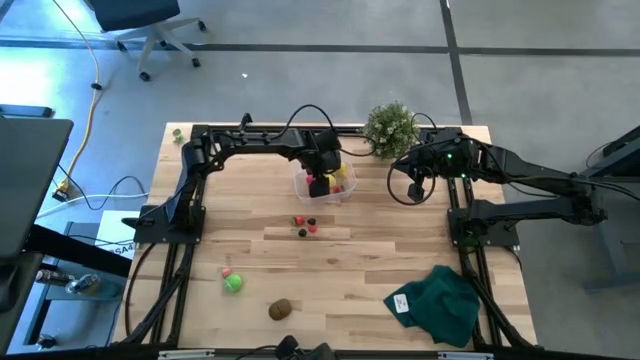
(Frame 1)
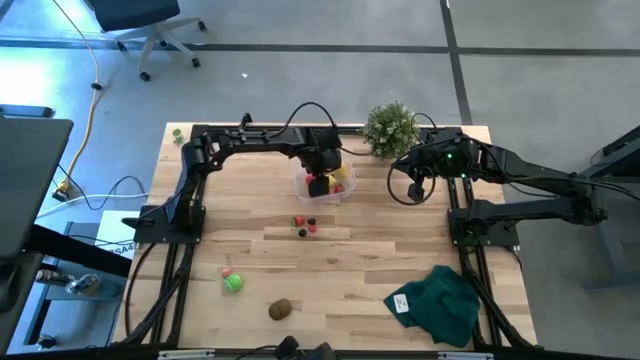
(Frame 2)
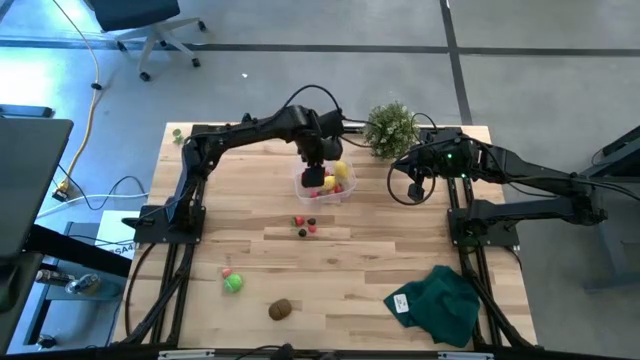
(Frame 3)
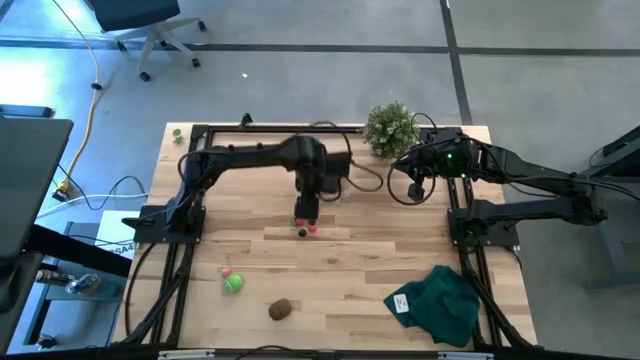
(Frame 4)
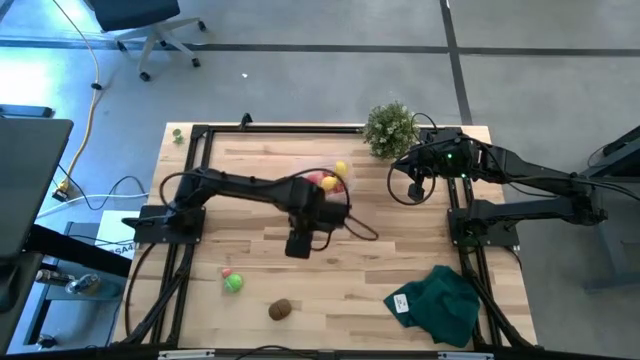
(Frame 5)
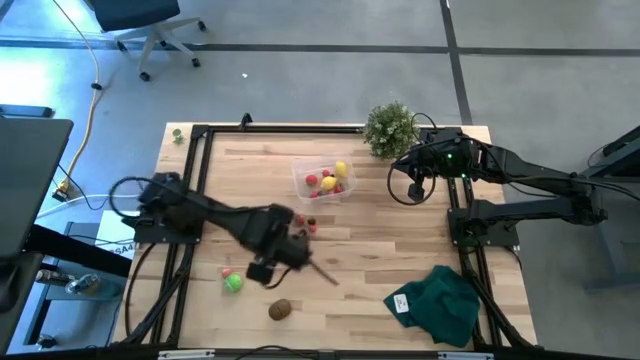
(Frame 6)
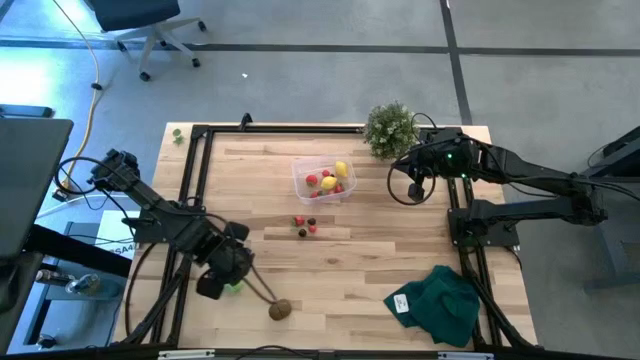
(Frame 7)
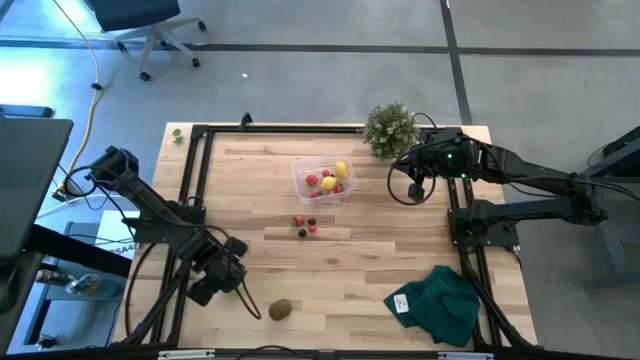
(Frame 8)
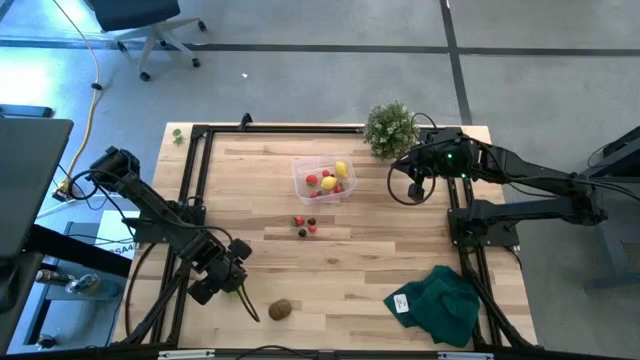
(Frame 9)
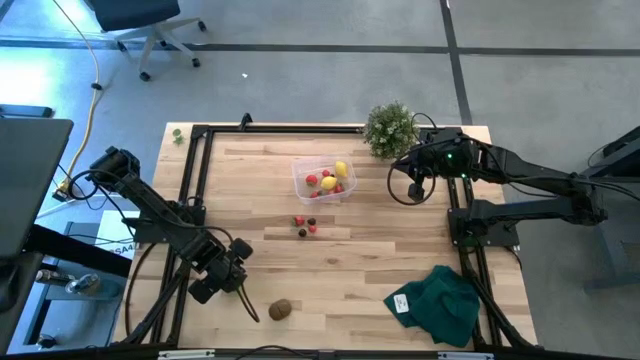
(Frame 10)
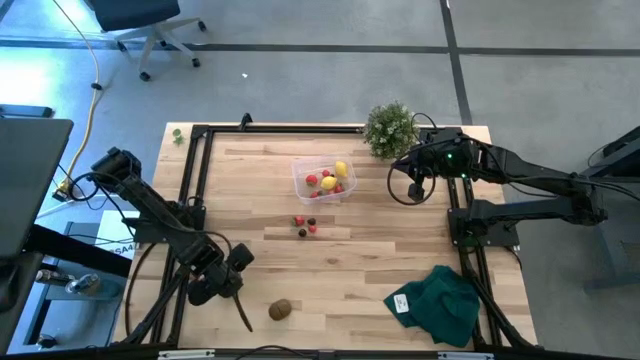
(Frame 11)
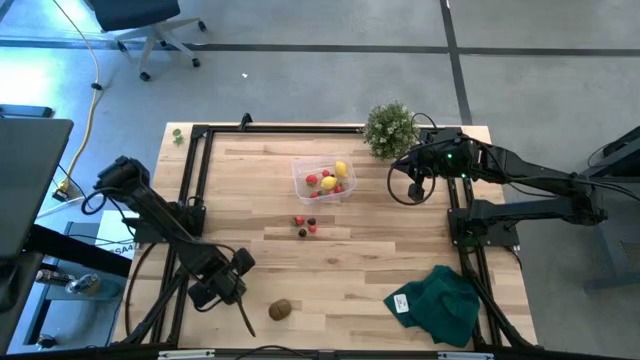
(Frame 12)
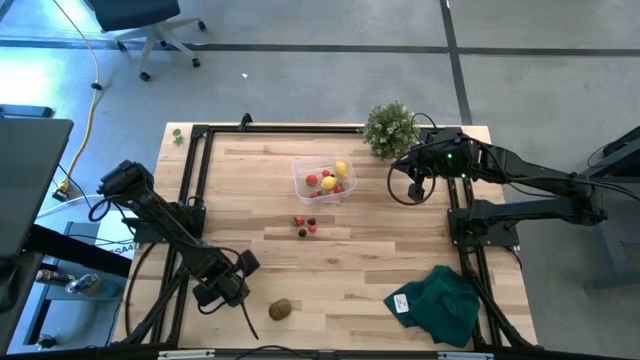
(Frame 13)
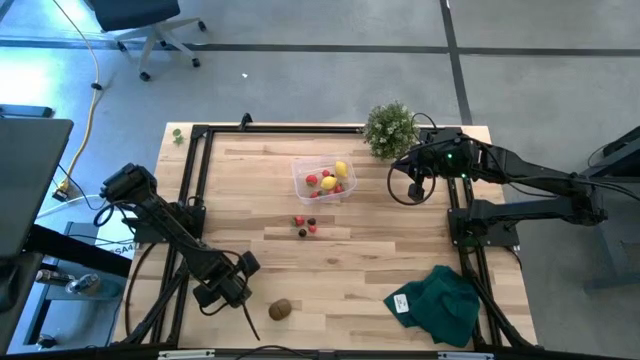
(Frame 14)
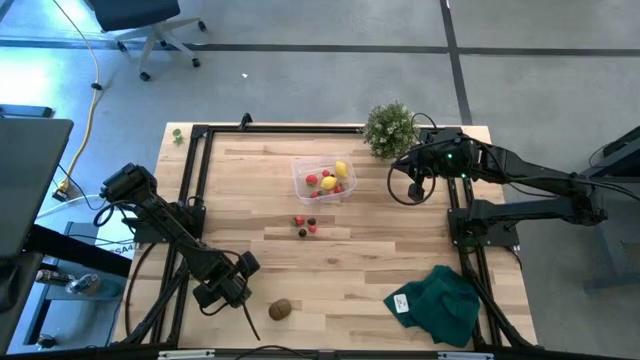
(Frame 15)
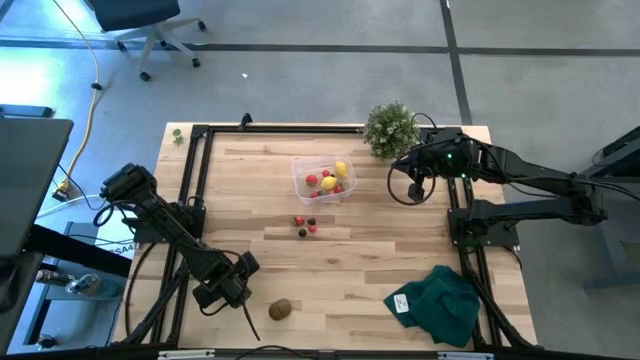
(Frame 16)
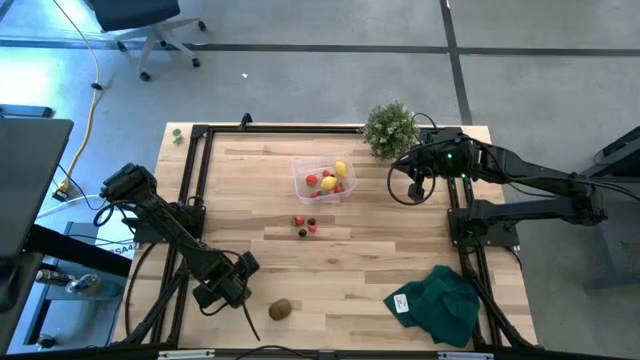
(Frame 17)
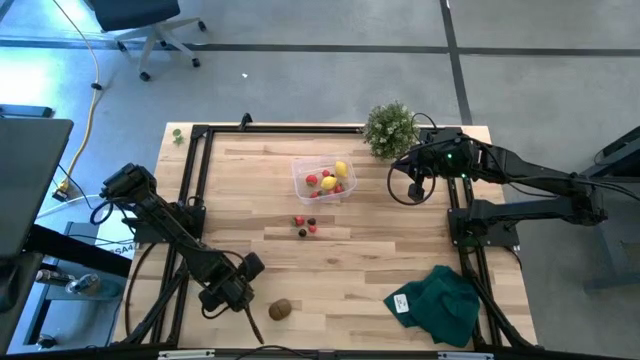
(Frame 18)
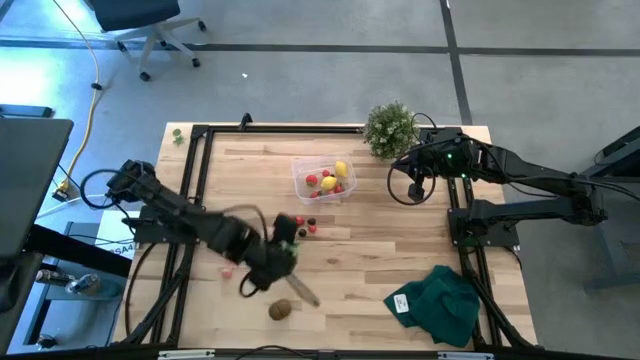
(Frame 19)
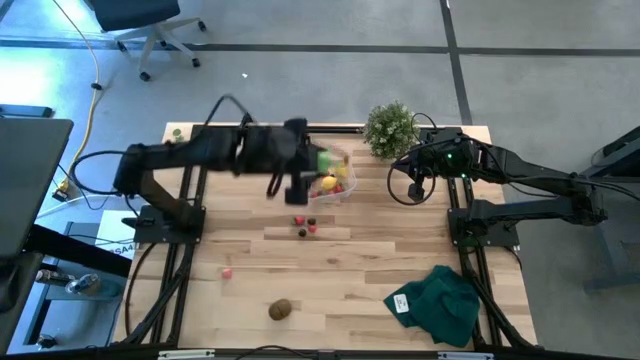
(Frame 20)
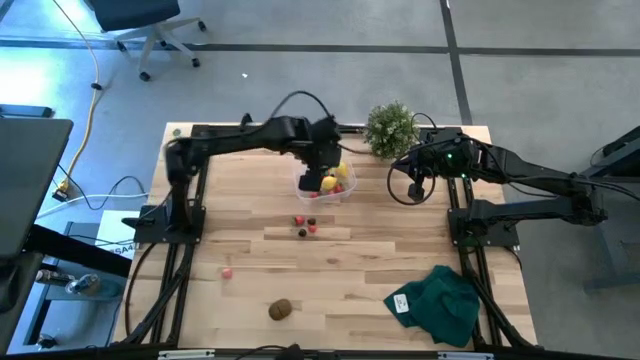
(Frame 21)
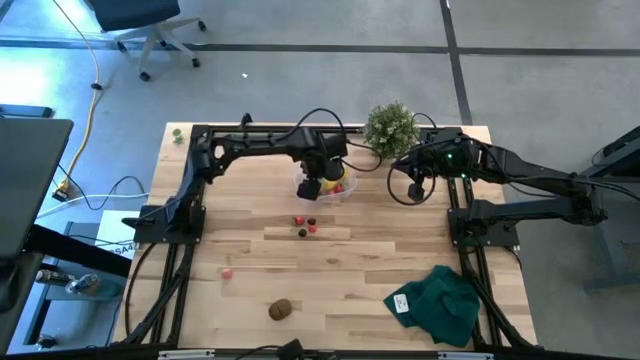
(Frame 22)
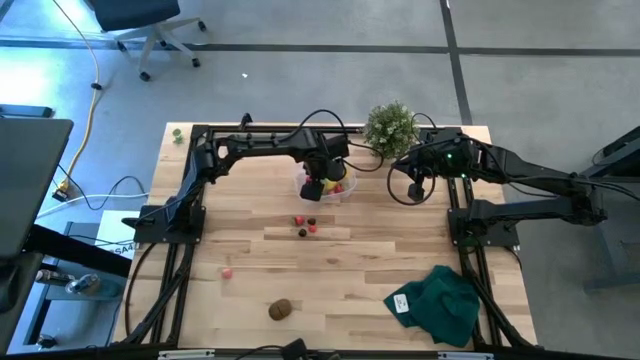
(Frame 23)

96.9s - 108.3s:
Task: Pick and placing Produce into tupperware
Put the green cabbage into the transparent bin

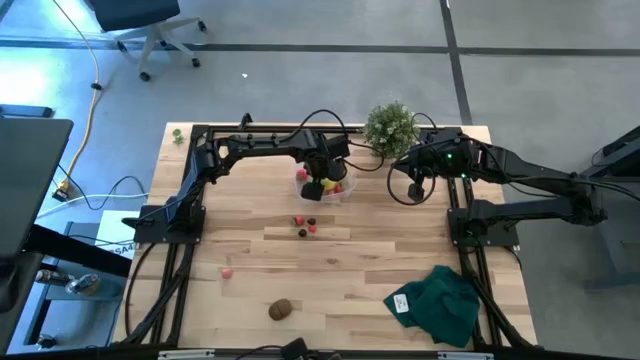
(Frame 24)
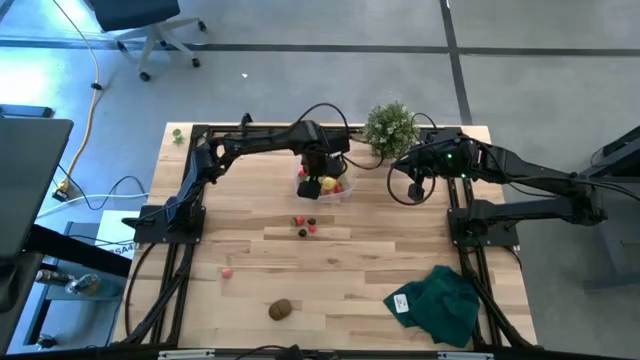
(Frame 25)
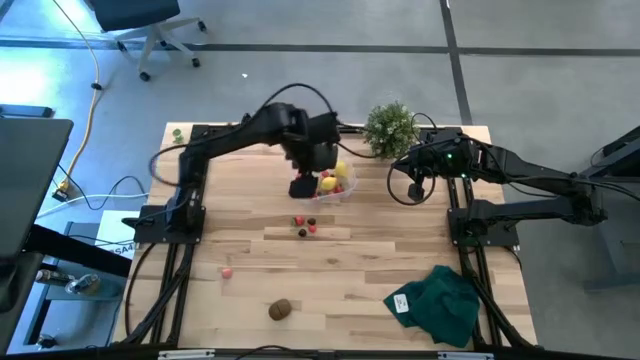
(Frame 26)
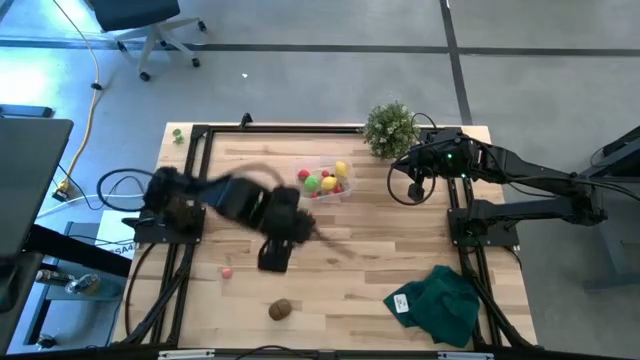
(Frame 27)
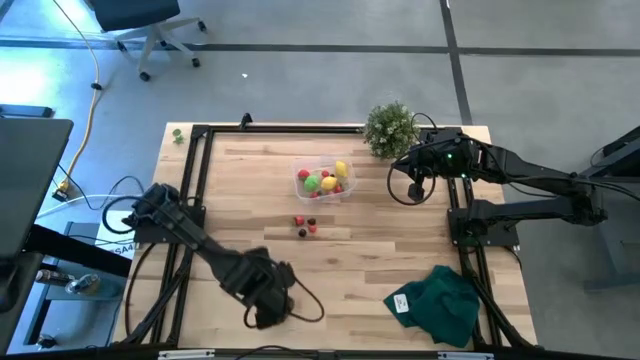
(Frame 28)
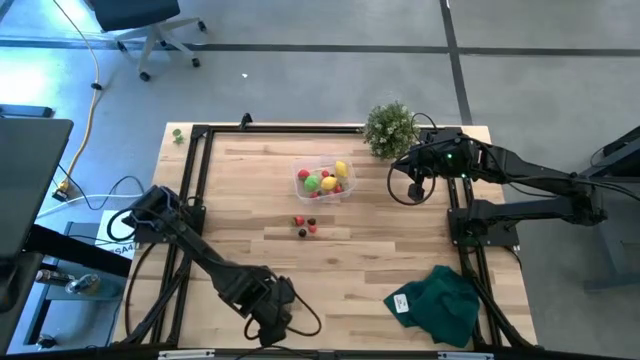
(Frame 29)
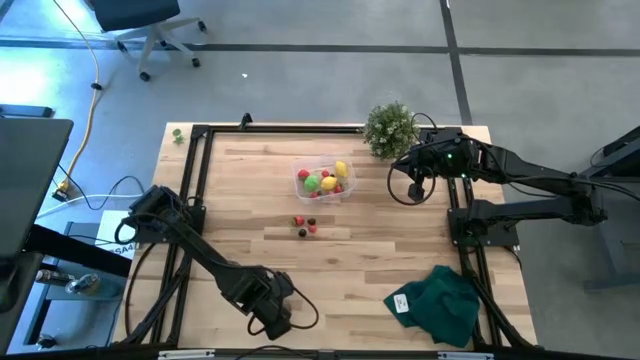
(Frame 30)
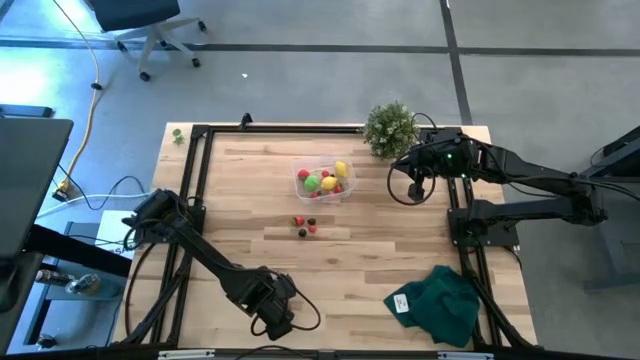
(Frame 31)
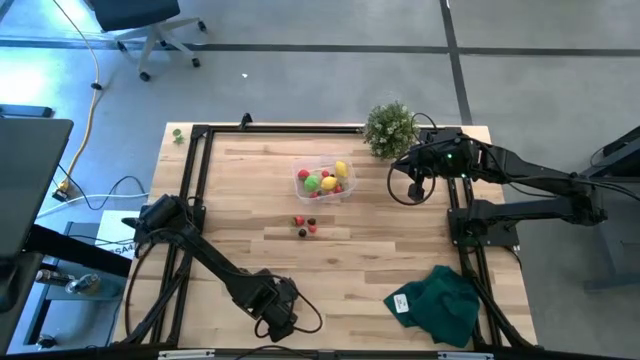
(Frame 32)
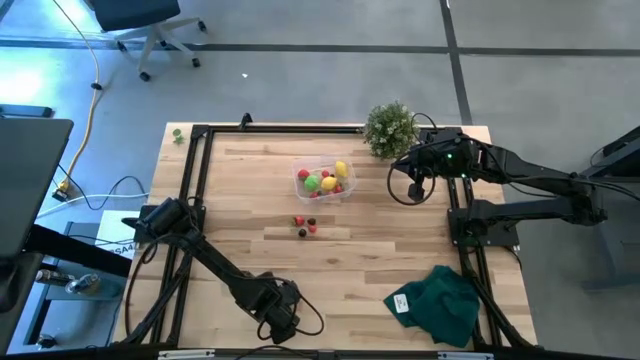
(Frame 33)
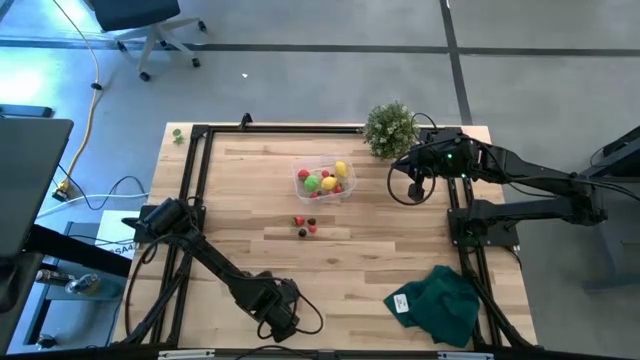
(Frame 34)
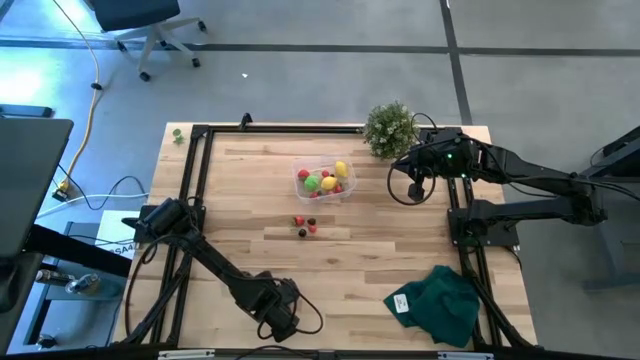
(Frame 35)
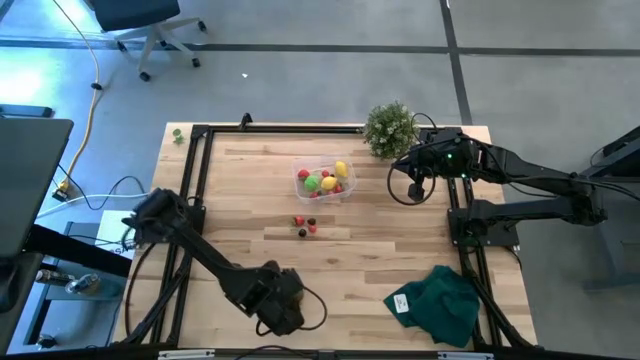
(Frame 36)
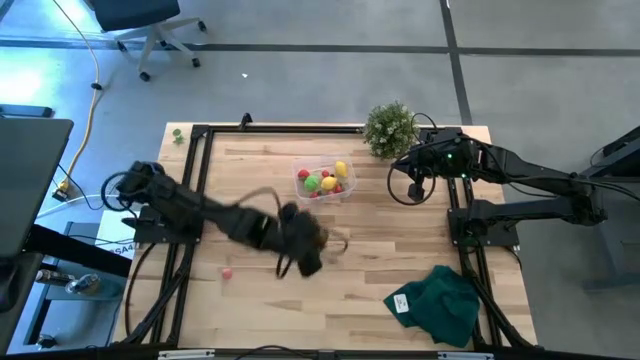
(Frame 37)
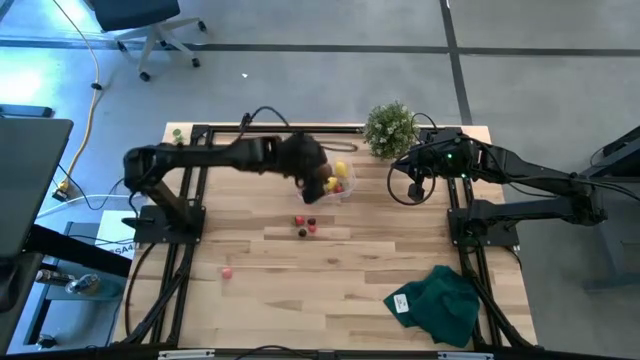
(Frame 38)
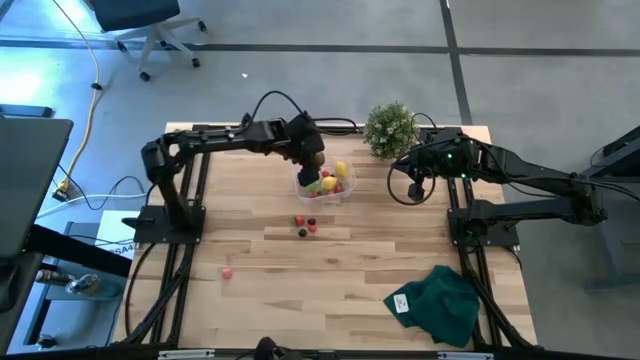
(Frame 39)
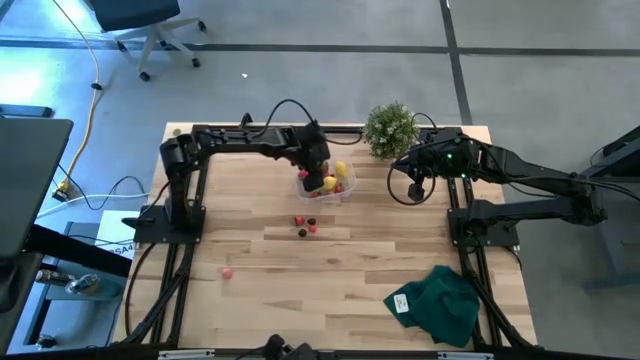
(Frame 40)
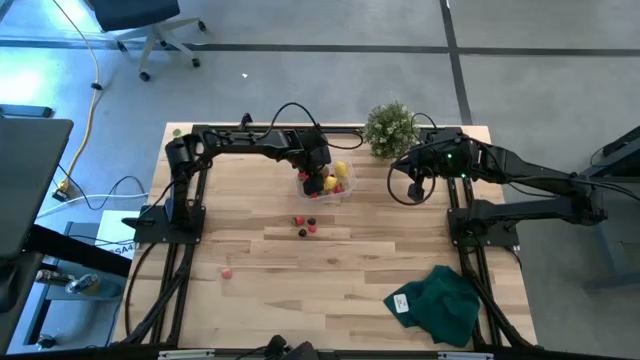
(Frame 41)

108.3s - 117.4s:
Put the brown kiwi into the transparent bin
